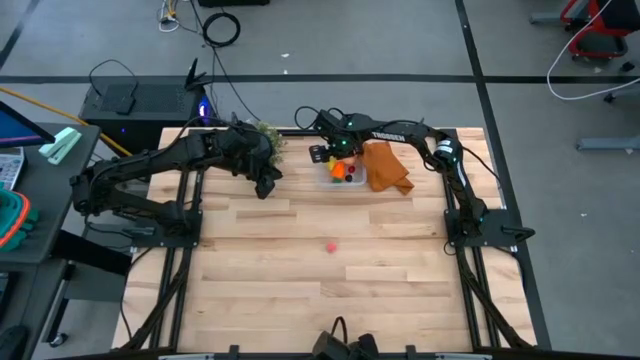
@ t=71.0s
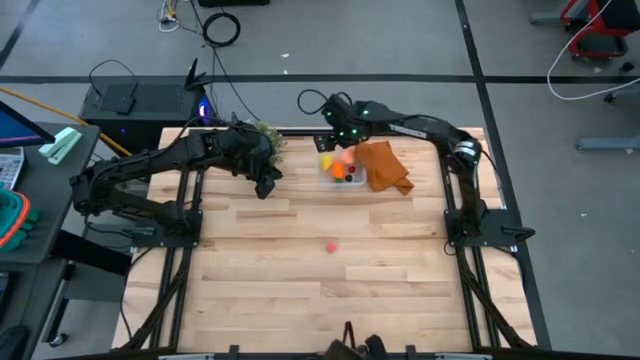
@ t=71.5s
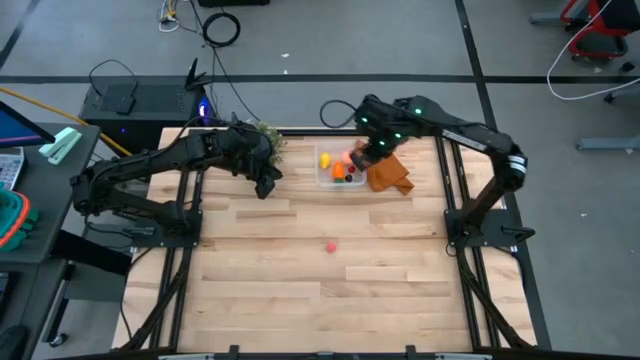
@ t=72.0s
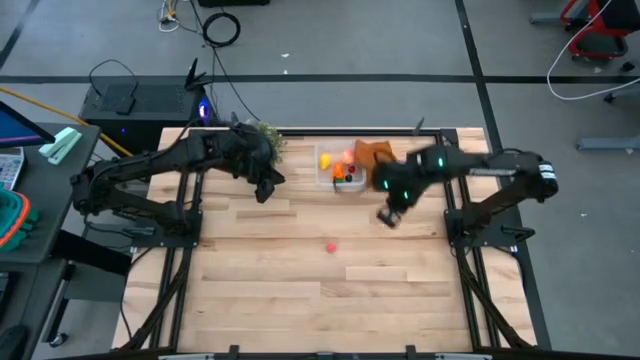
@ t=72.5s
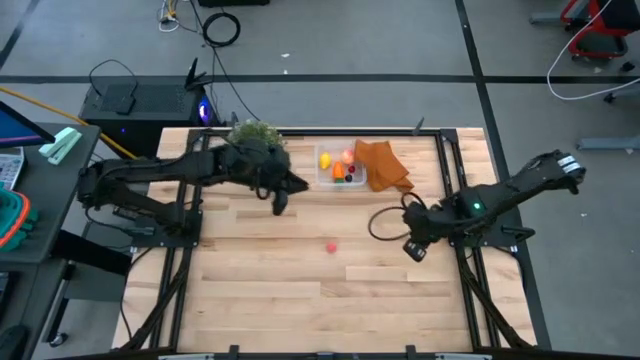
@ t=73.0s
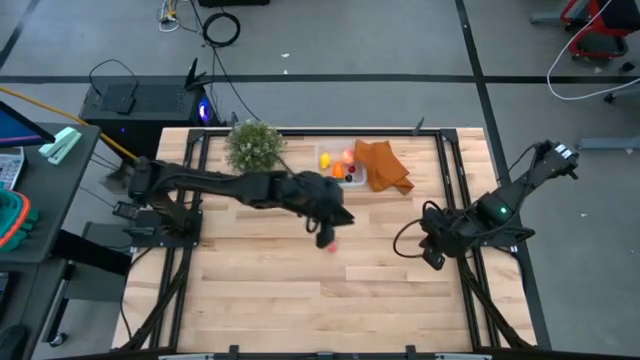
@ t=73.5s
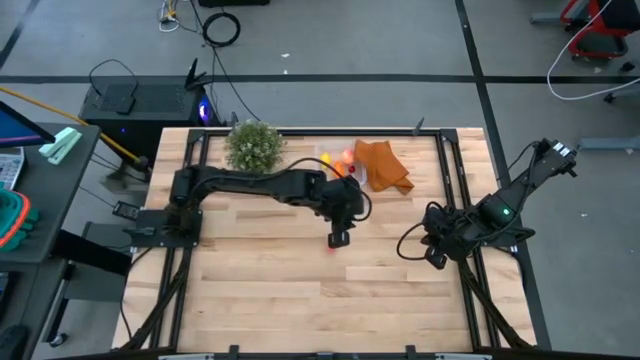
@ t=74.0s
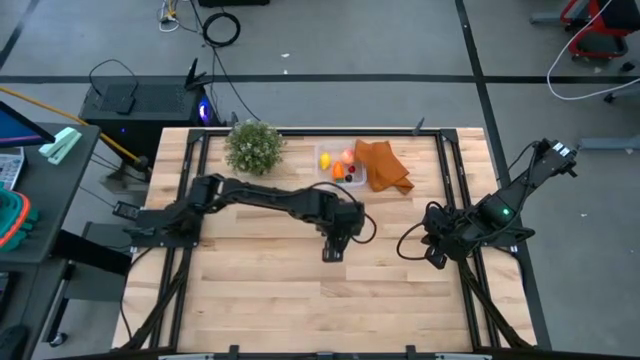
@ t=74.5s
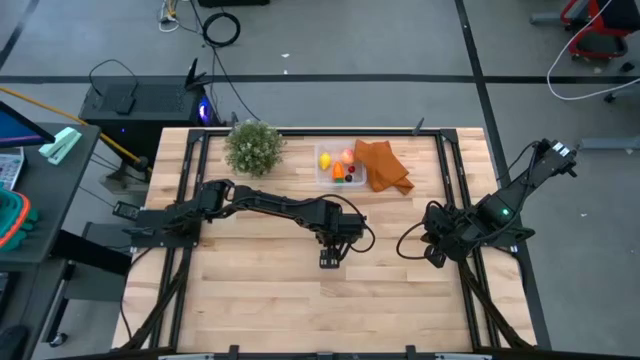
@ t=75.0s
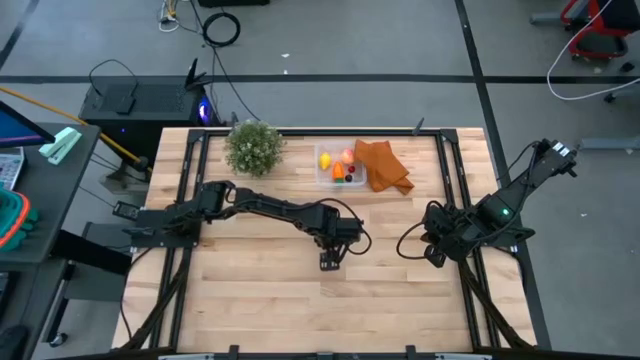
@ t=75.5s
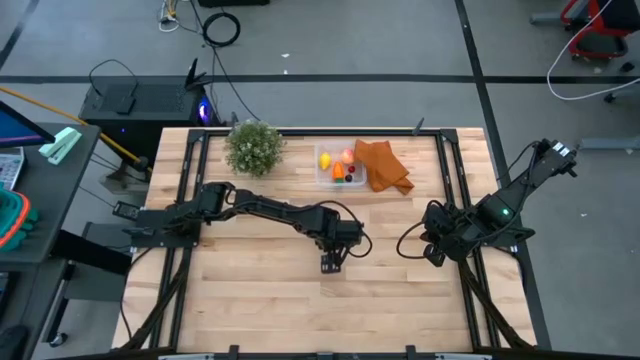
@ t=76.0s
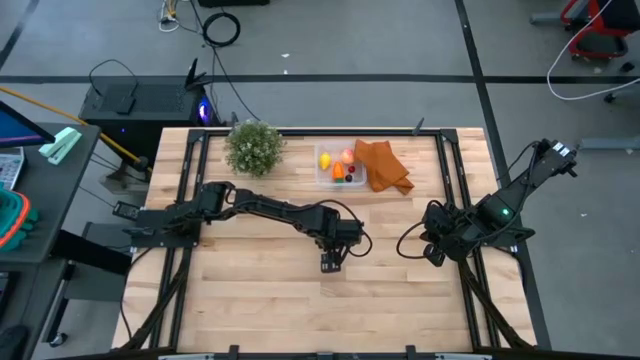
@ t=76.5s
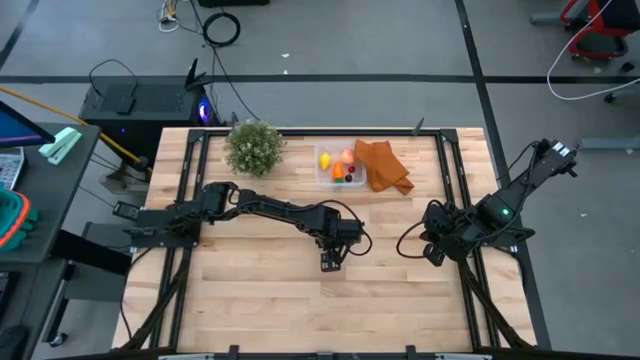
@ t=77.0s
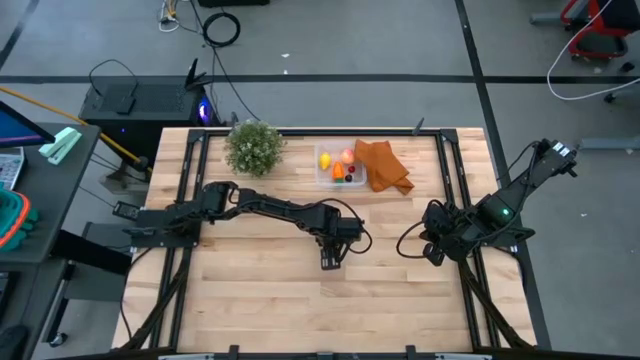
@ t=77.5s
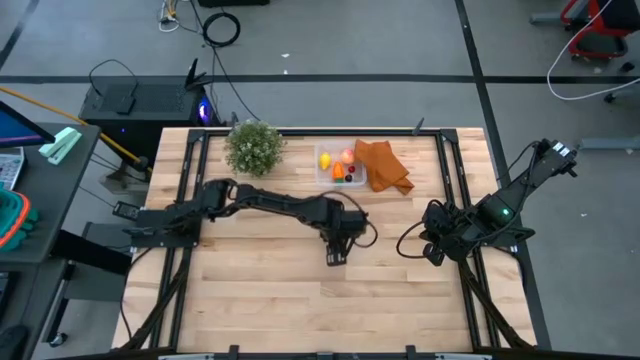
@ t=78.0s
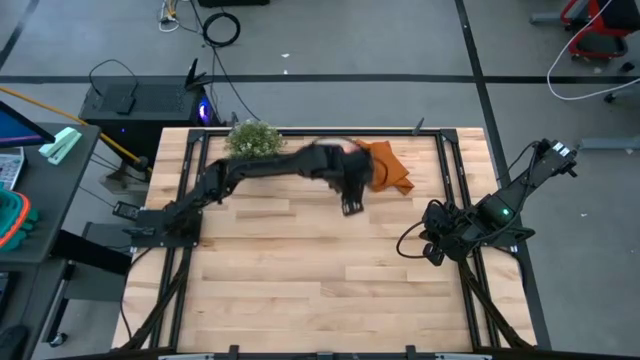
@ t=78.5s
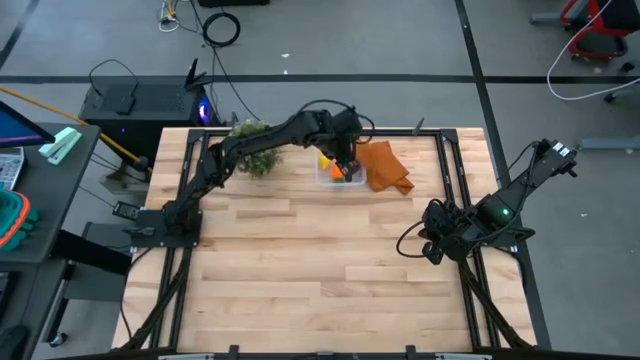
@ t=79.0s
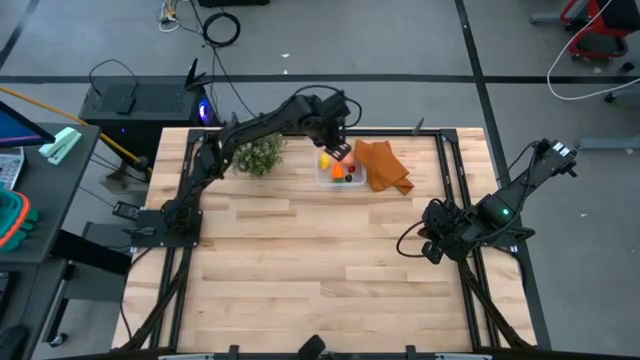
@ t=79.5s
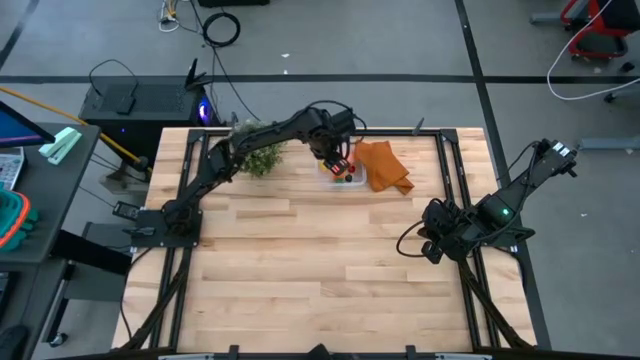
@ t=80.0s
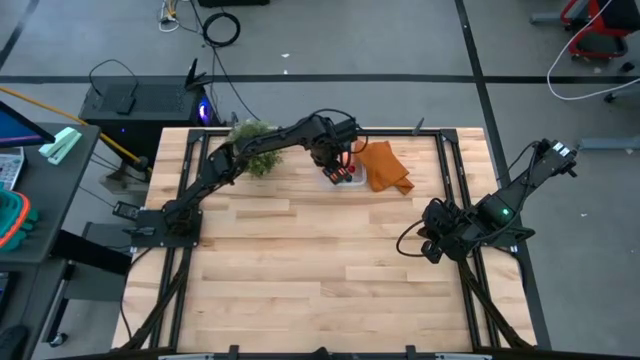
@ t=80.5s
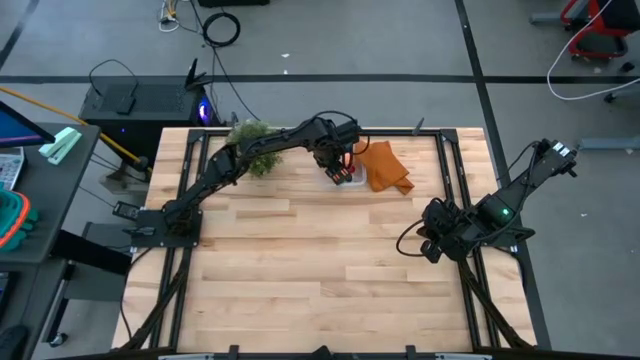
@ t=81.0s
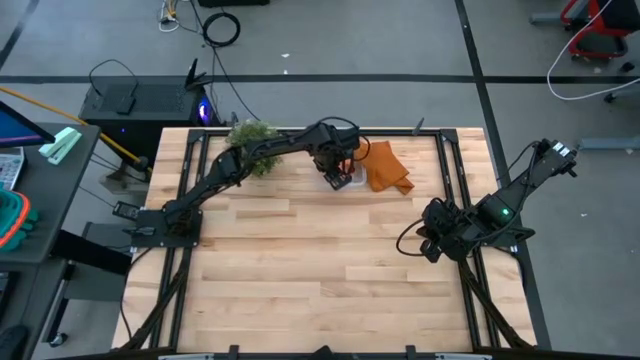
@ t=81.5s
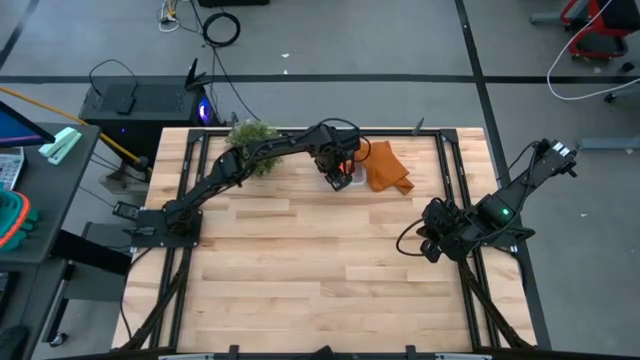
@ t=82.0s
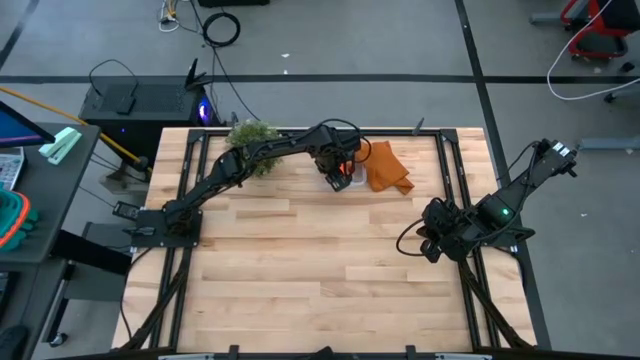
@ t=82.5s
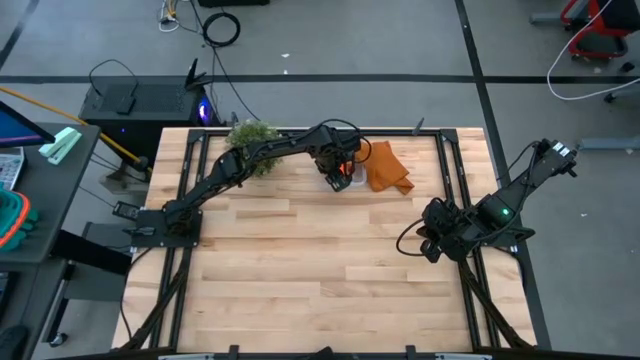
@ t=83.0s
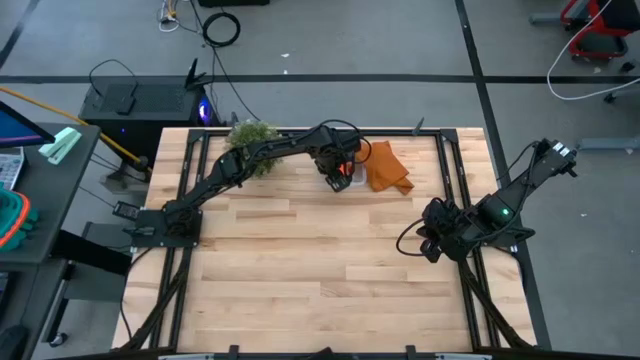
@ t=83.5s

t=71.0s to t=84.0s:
Task: Pick and placing Produce into tupperware
Put the small peach into the transparent bin

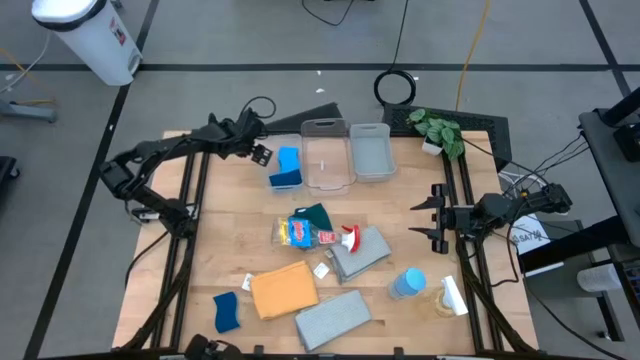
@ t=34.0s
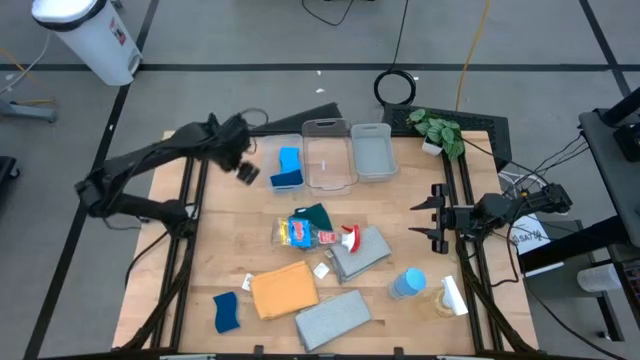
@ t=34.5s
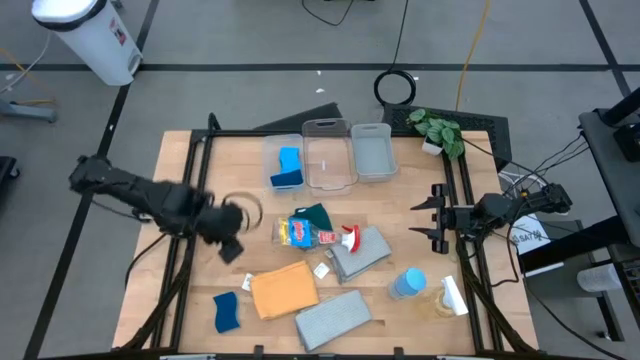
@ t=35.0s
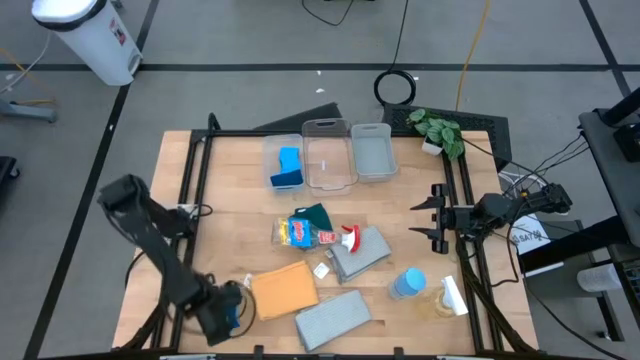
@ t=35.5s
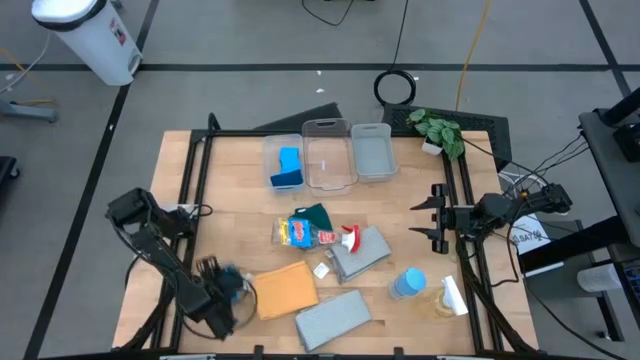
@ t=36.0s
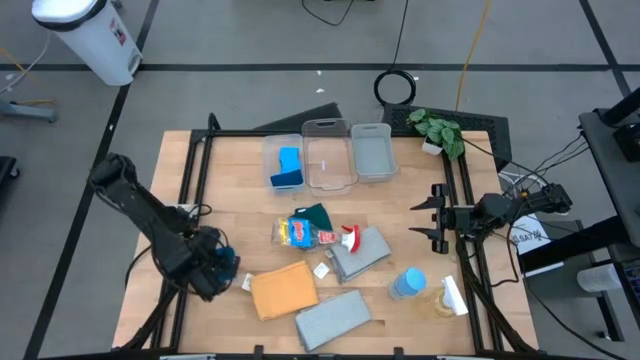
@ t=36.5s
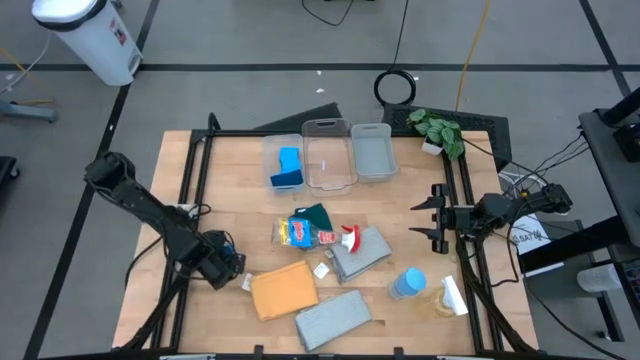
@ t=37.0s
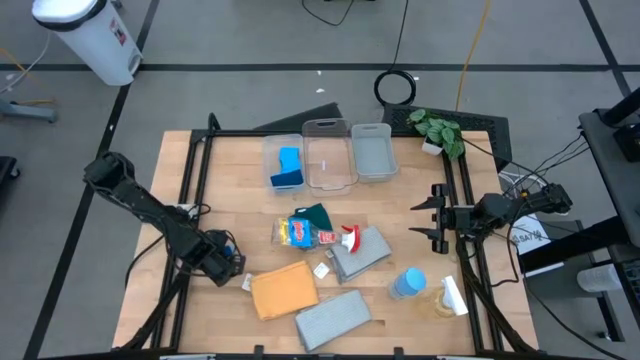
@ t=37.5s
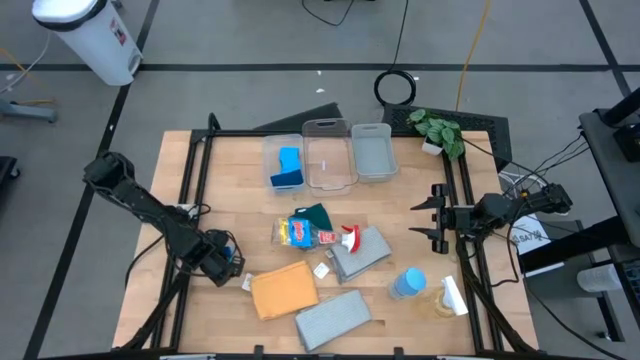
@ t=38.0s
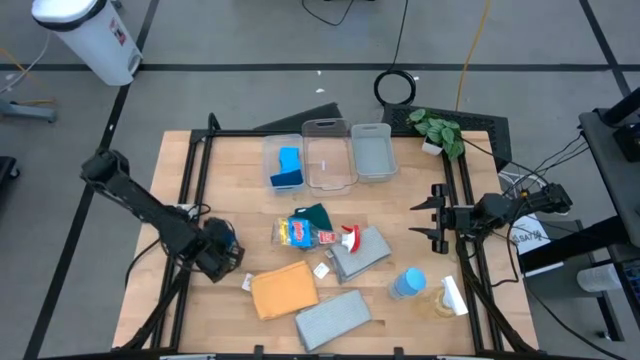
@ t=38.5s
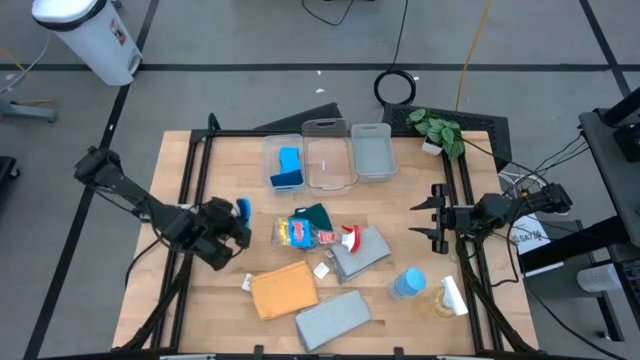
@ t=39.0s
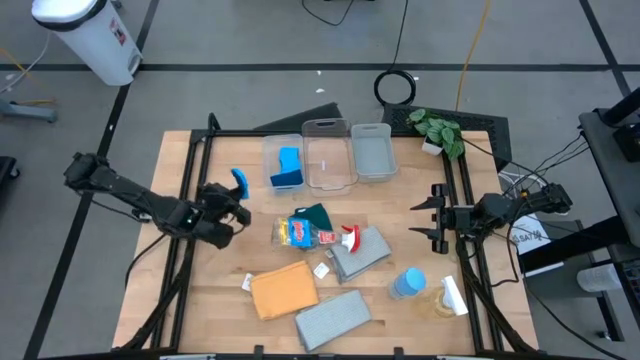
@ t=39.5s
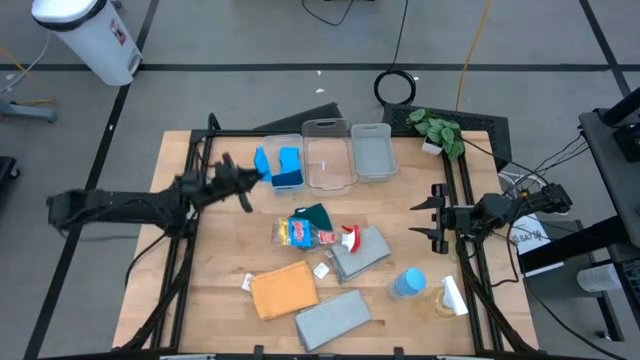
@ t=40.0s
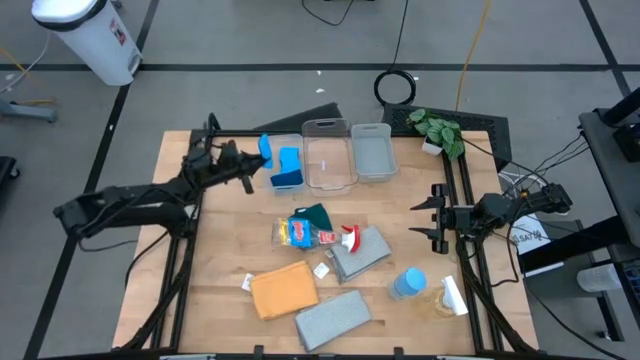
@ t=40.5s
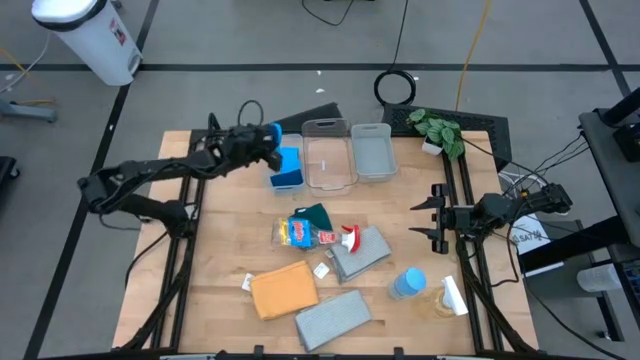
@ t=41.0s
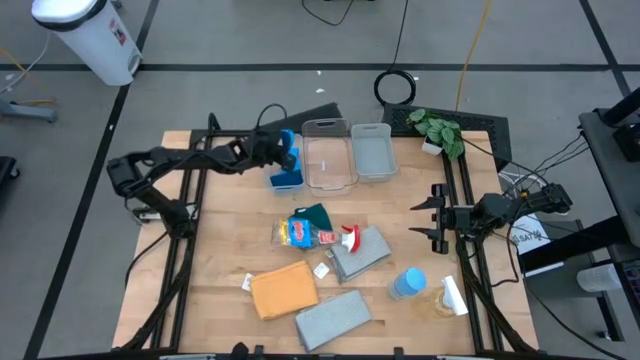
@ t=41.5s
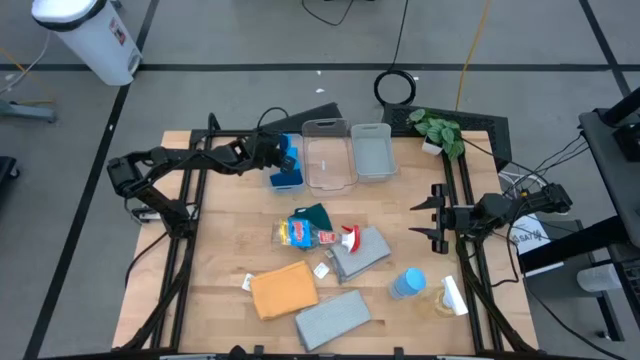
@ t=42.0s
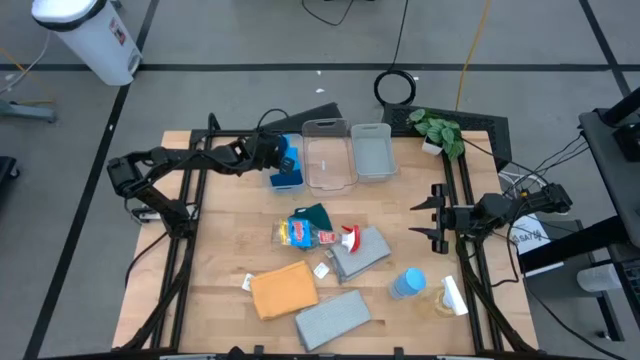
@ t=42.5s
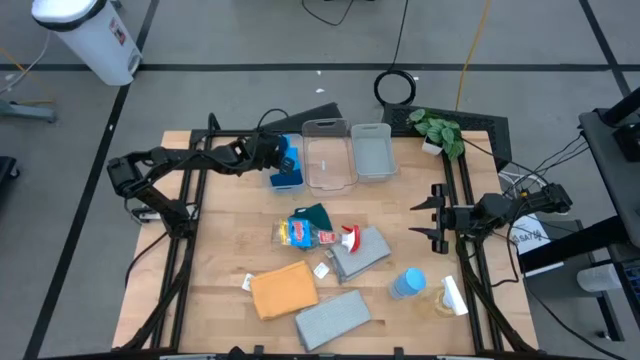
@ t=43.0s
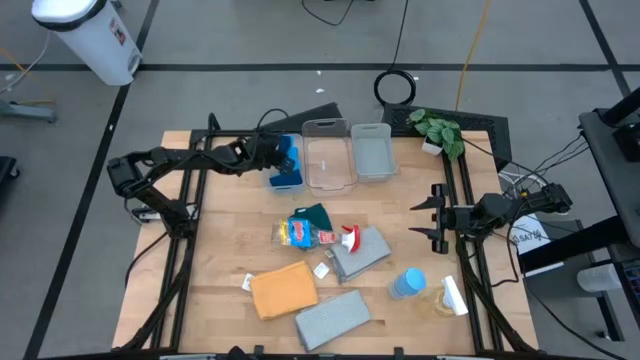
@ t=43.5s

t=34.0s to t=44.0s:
Task: Pick & Place Kitchen Items
Put the blue sponge into the white transparent bin
